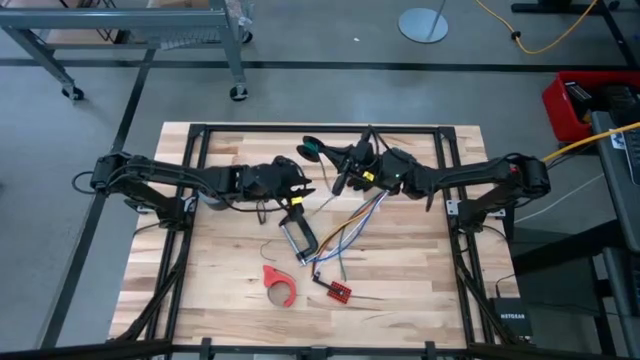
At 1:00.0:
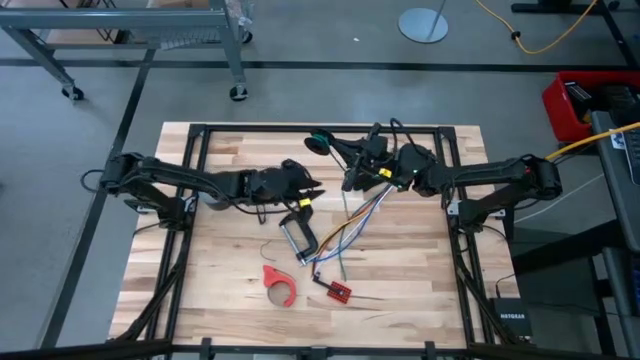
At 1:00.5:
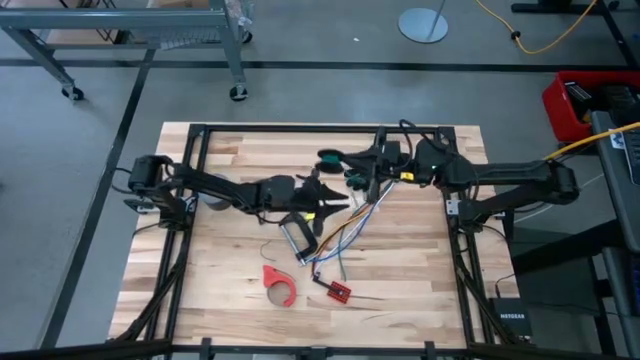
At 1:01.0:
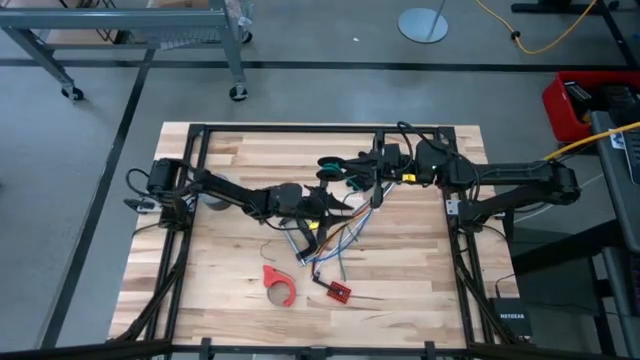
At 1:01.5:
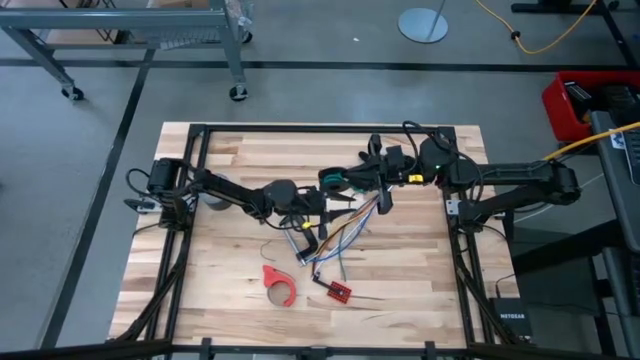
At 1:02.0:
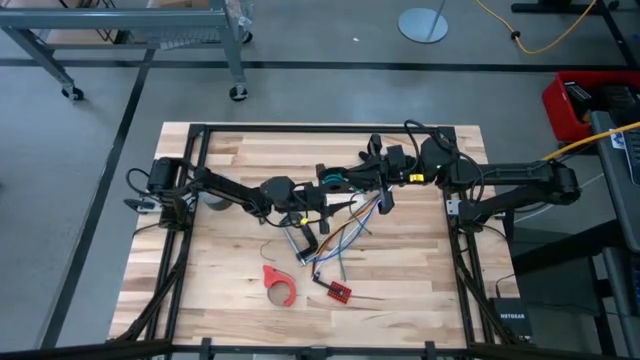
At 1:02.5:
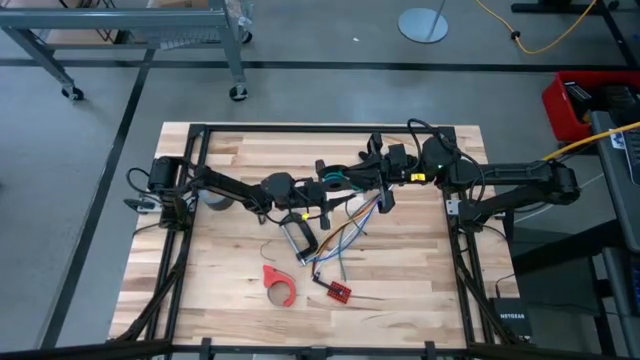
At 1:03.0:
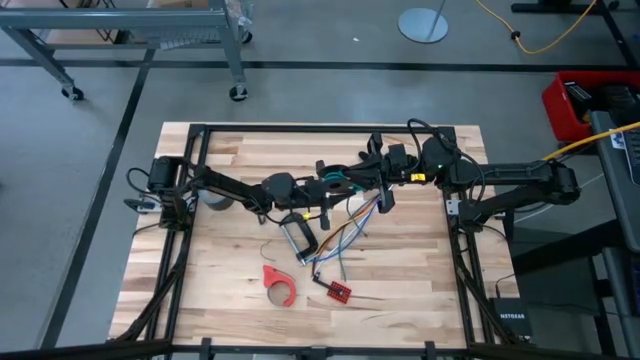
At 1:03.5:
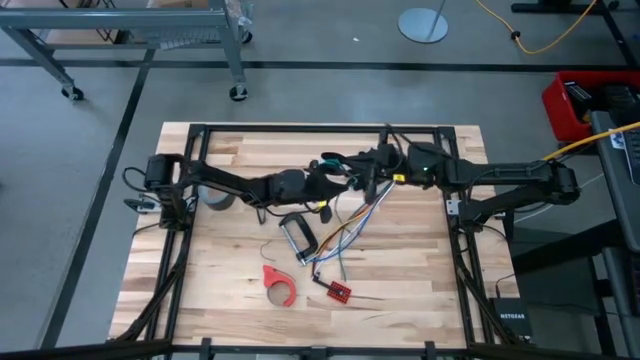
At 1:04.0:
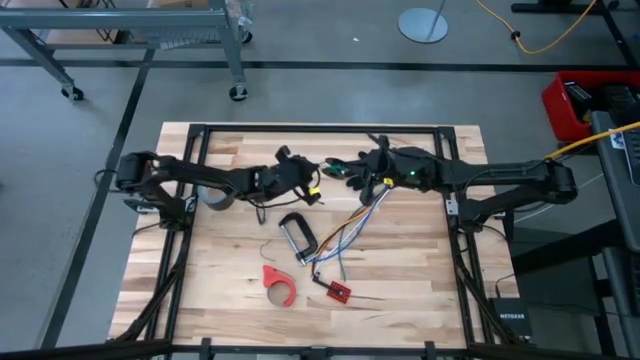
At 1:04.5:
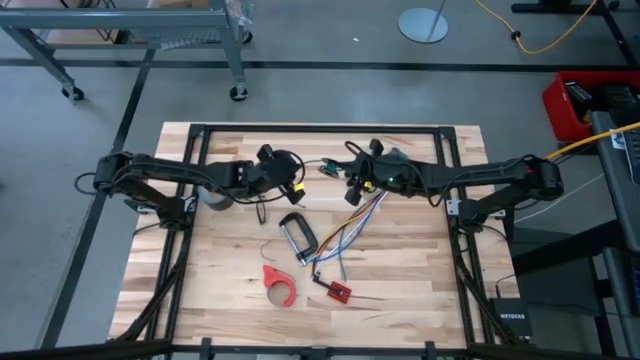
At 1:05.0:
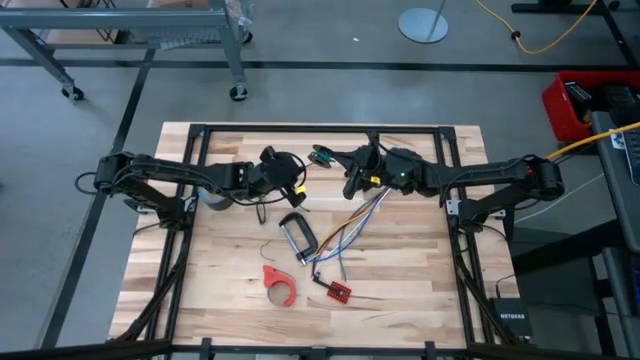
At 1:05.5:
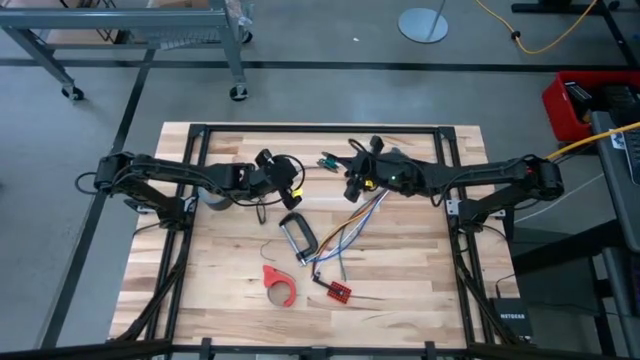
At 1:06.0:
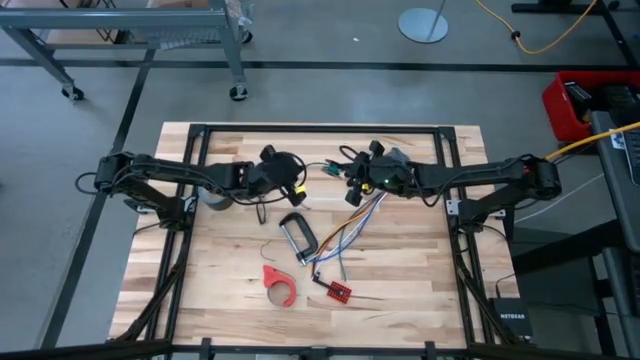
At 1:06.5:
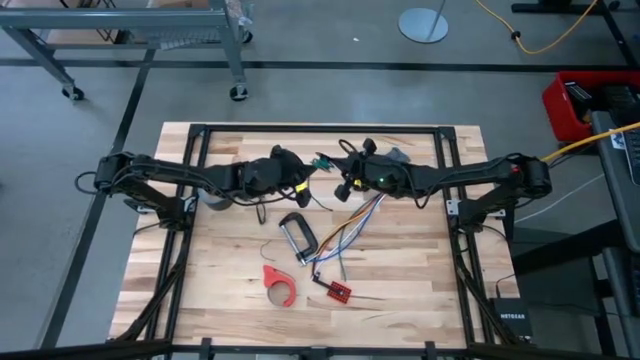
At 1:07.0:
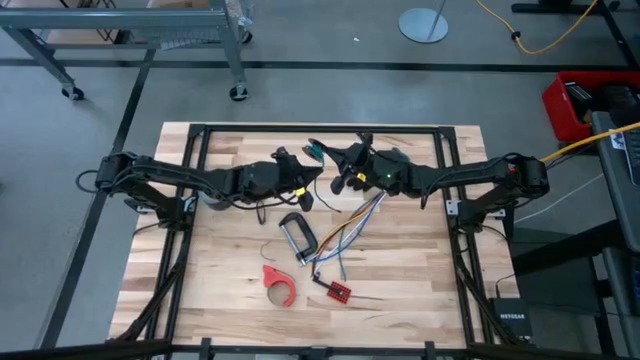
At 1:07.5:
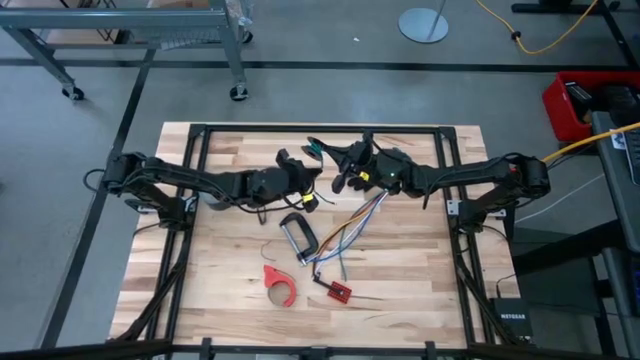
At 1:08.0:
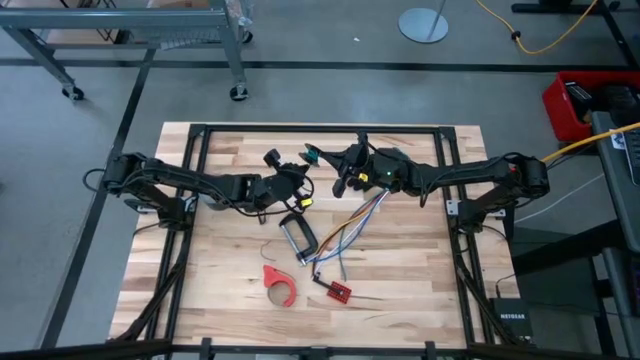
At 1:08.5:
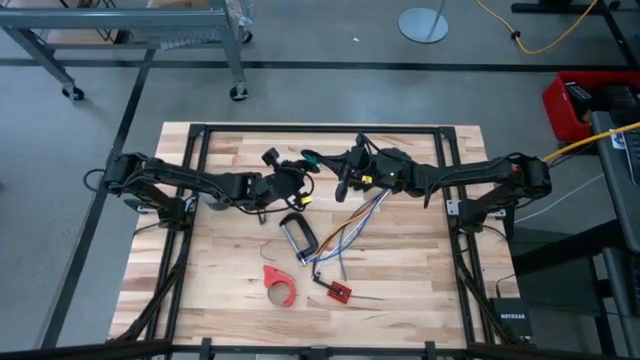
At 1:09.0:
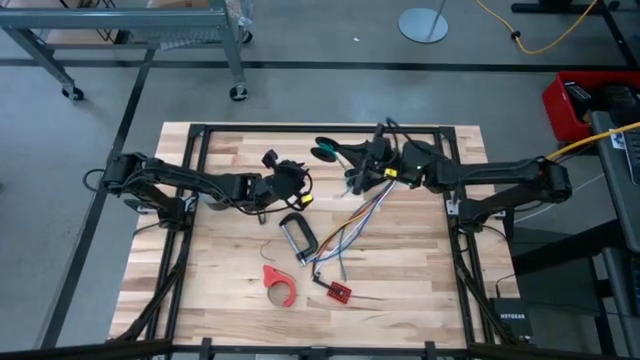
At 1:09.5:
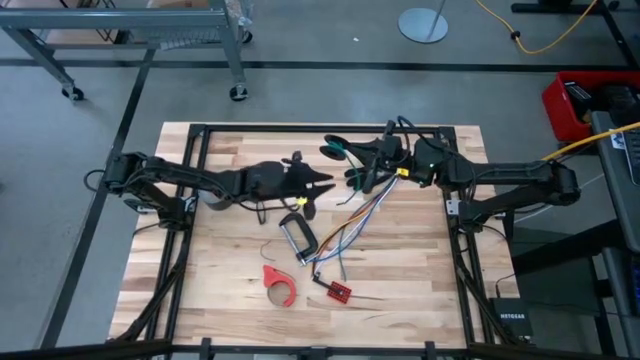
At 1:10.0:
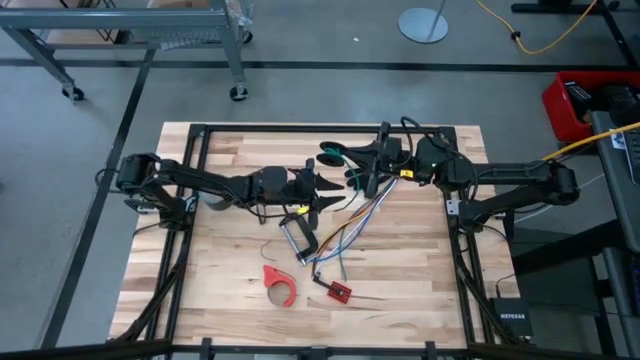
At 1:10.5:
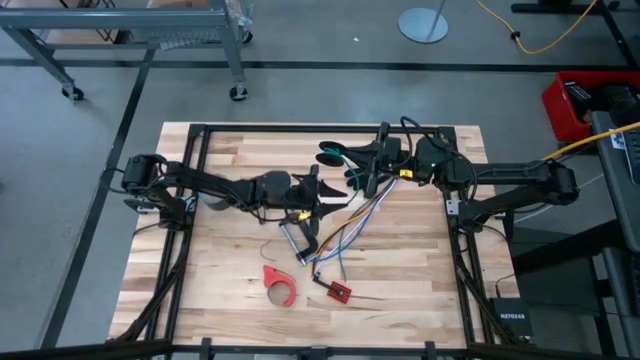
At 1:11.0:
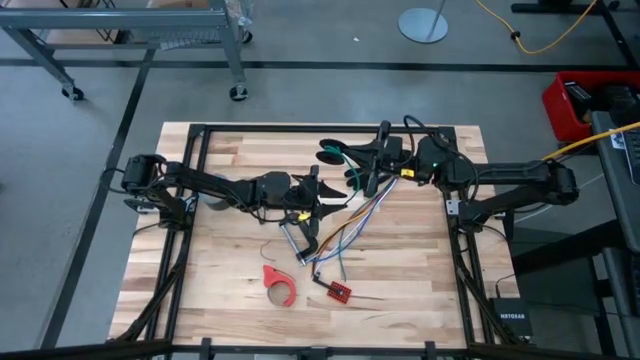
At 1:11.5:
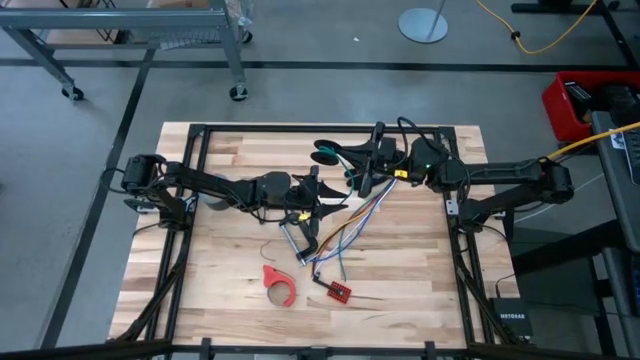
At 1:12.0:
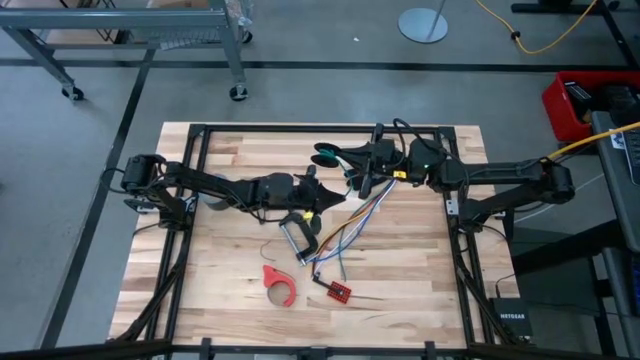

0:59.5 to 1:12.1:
Task: Coil cords
Coil the green wire around the spool

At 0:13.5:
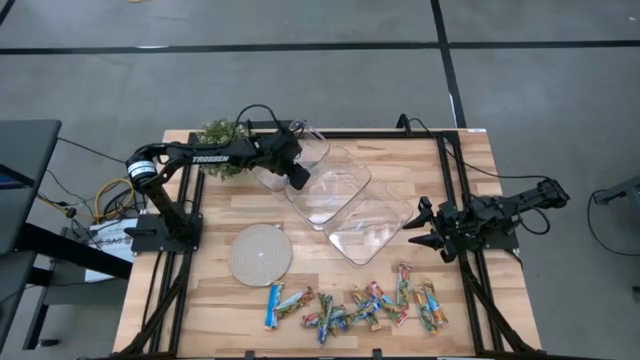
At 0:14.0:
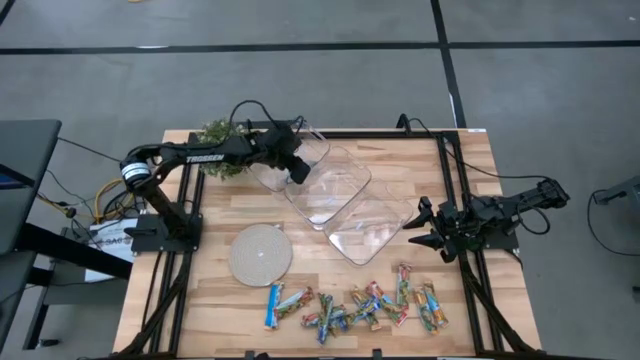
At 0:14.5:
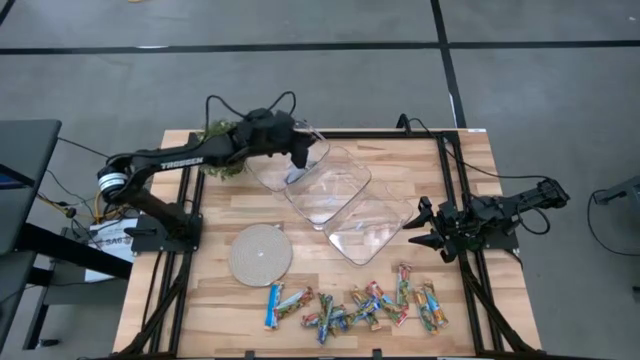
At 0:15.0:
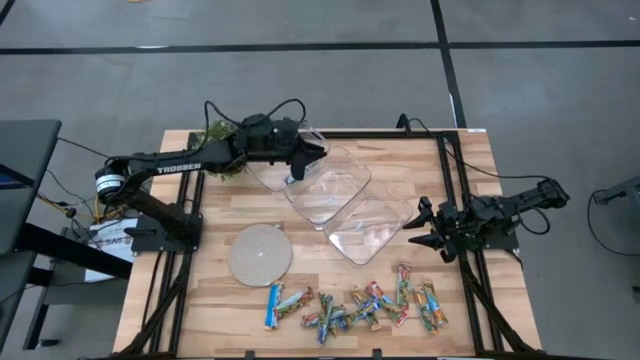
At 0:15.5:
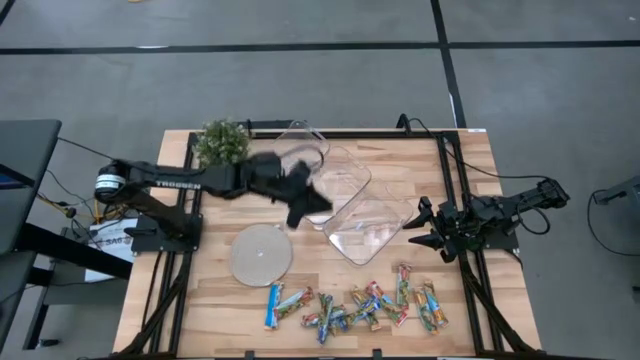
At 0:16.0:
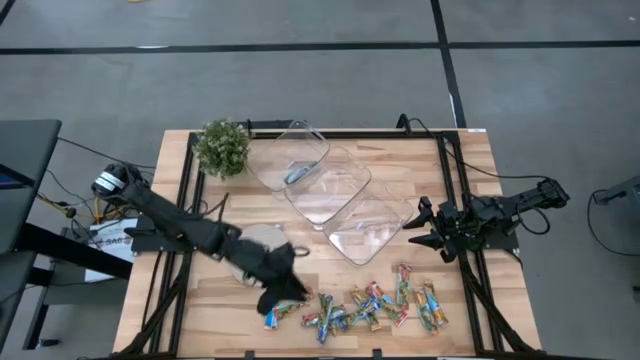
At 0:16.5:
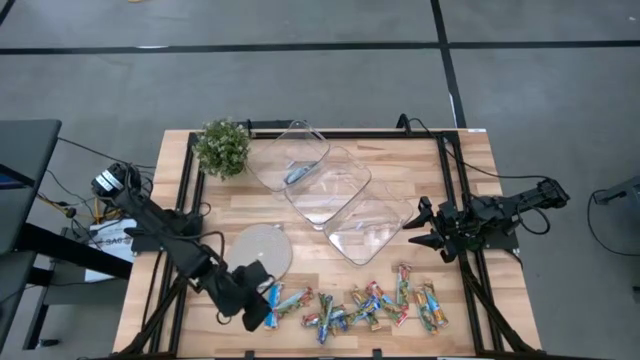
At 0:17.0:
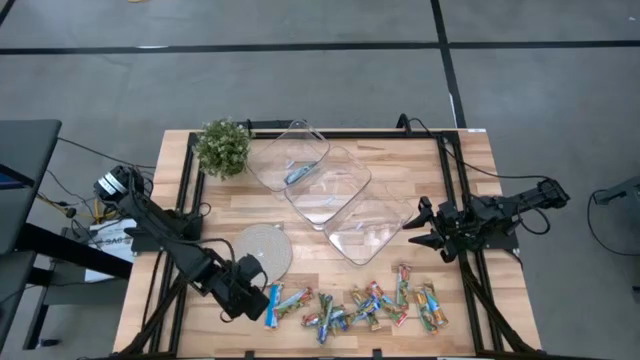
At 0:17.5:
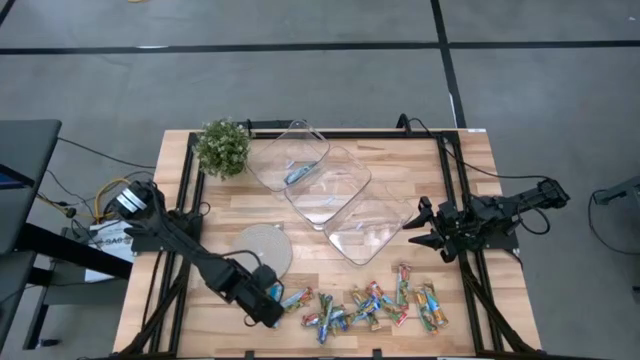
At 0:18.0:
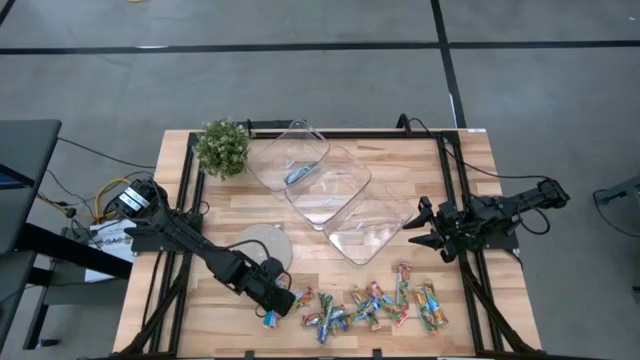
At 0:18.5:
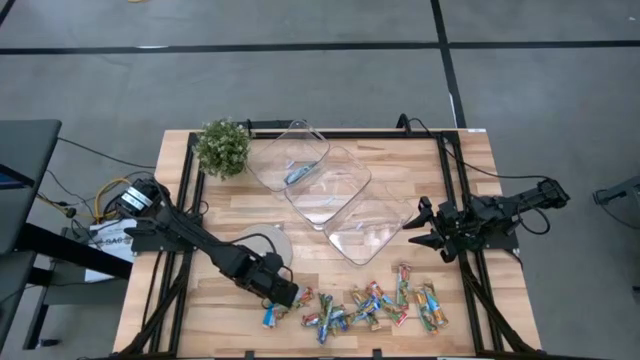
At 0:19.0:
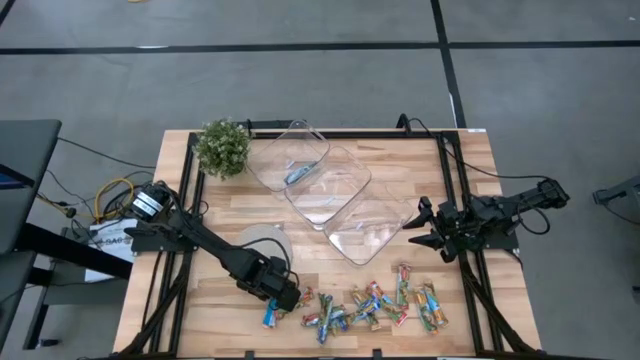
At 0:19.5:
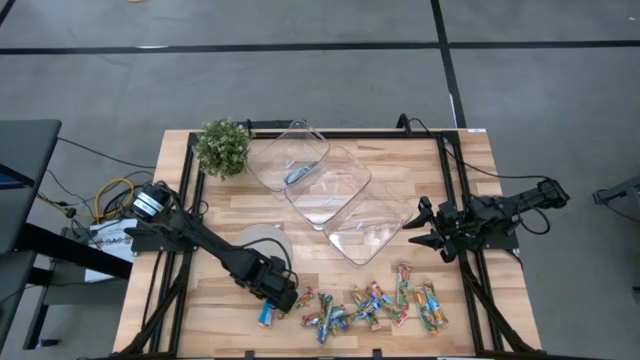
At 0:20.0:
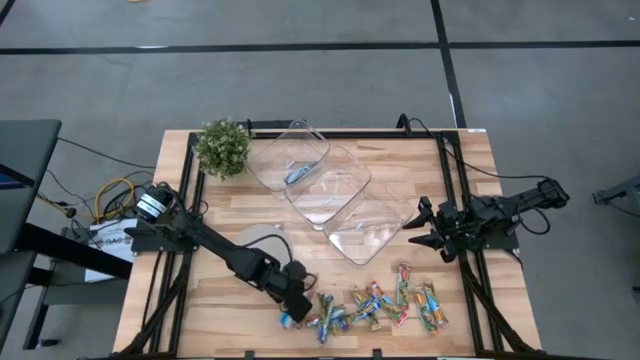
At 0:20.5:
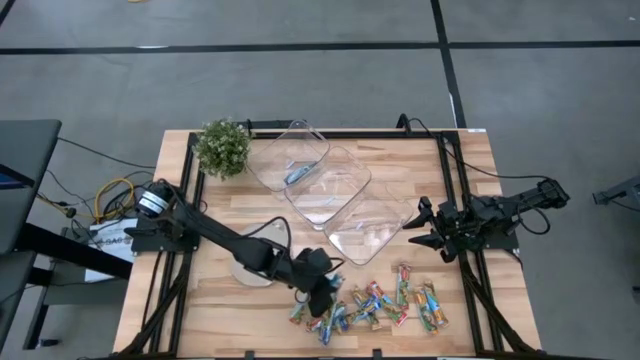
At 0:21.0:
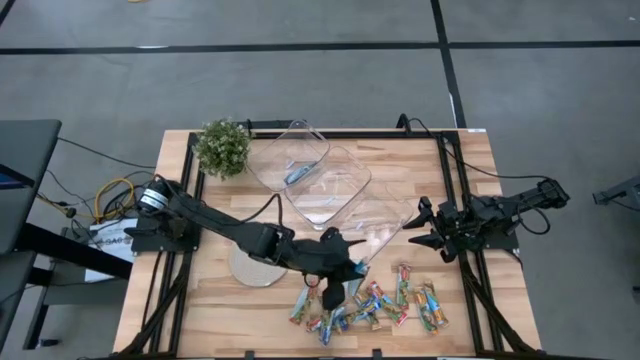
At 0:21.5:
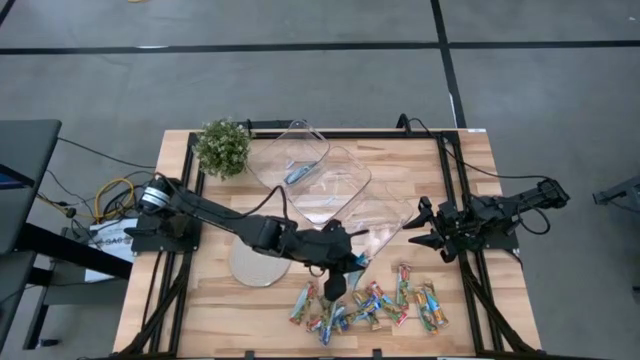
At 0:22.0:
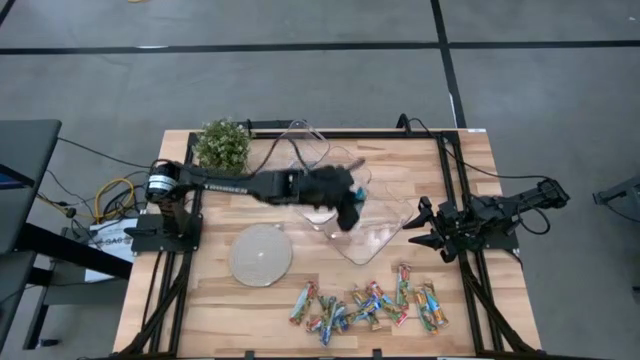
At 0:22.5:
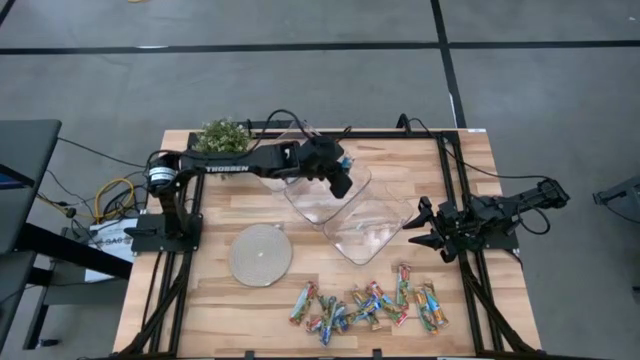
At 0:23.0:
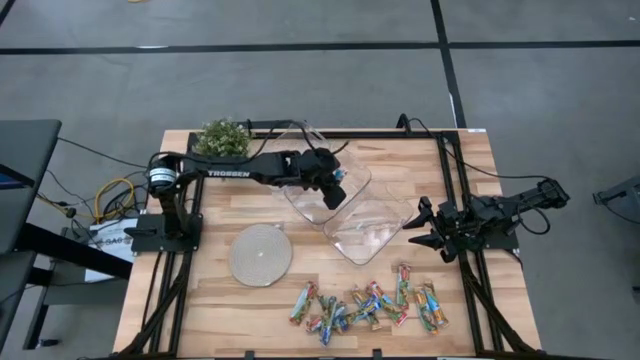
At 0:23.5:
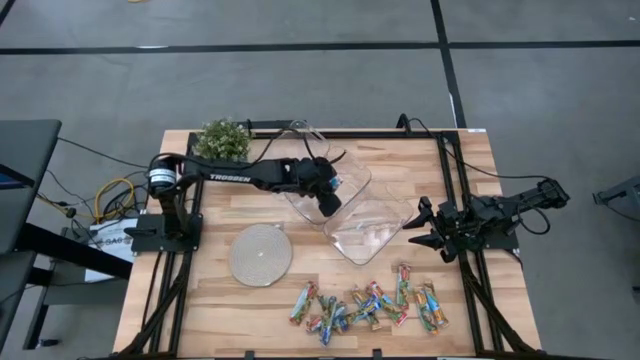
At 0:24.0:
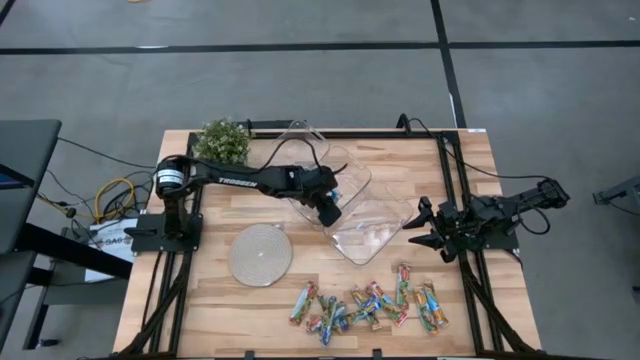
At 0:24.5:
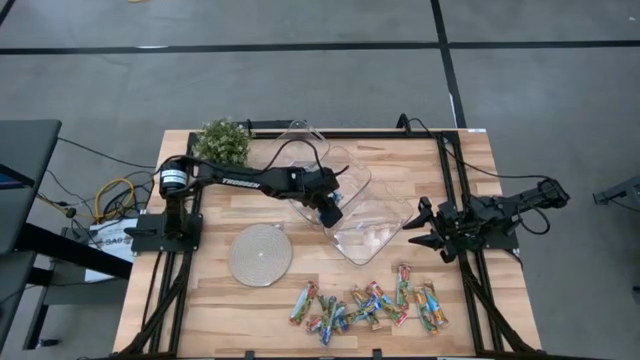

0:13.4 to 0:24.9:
Task: Pick and place Granola Bars by type
Put the yellow granola bar into the middle transparent bin
